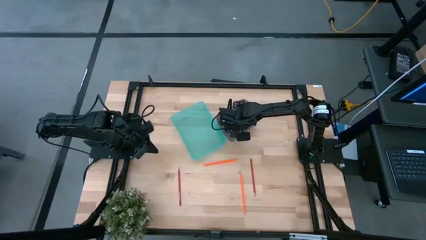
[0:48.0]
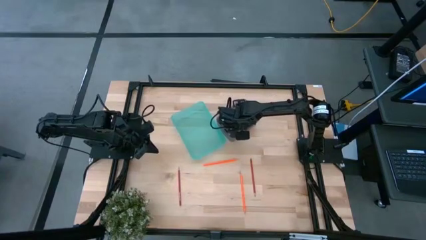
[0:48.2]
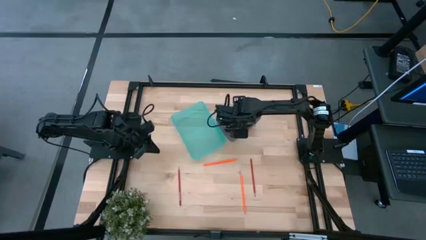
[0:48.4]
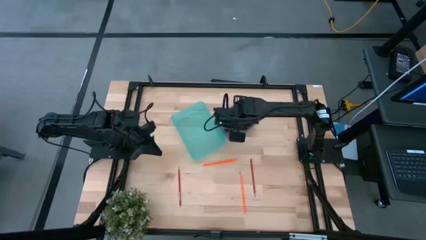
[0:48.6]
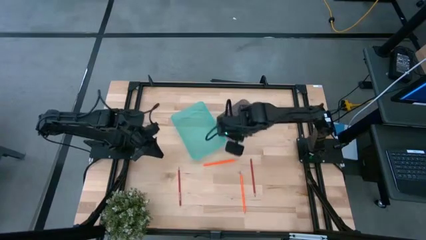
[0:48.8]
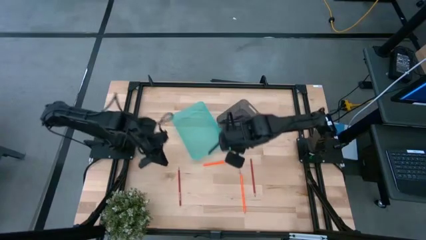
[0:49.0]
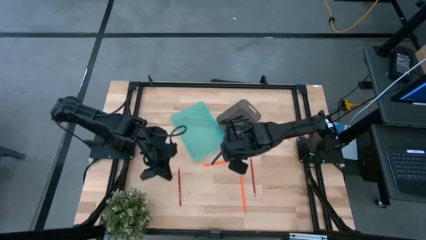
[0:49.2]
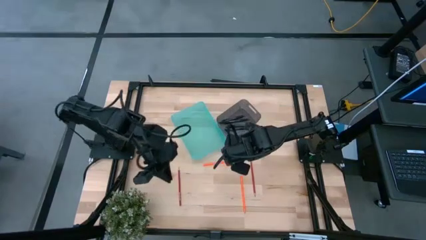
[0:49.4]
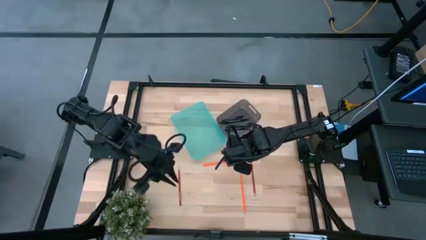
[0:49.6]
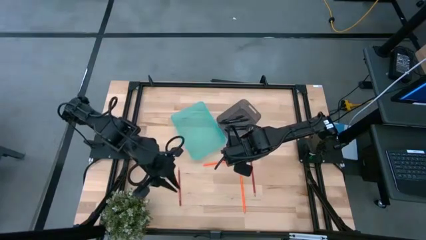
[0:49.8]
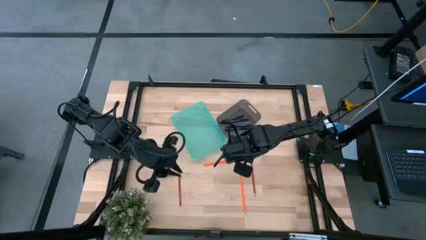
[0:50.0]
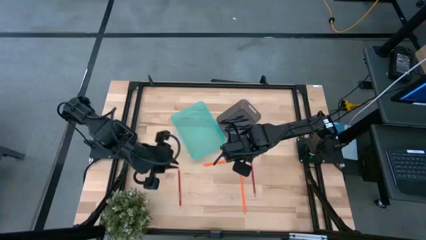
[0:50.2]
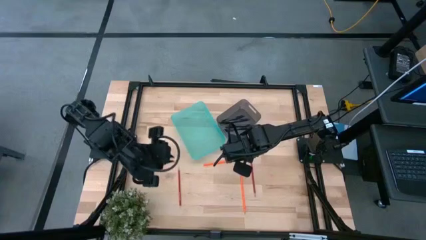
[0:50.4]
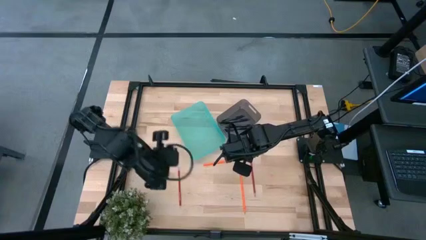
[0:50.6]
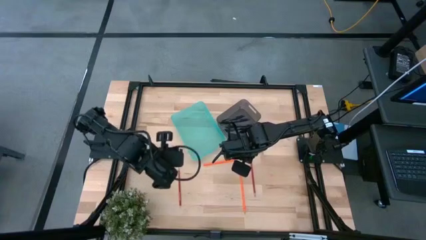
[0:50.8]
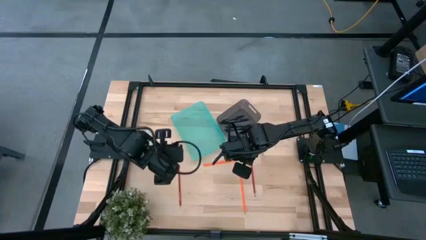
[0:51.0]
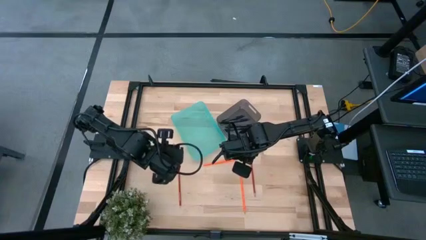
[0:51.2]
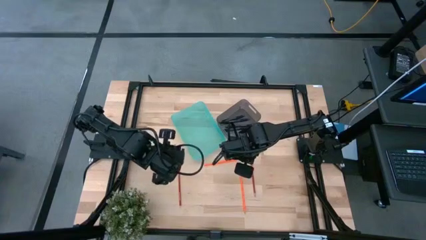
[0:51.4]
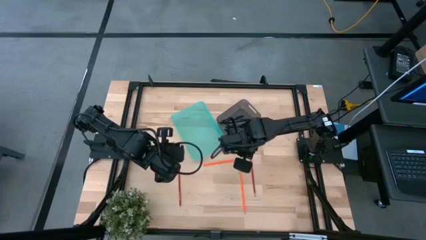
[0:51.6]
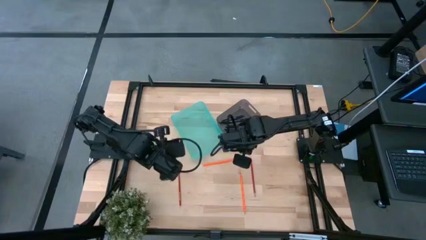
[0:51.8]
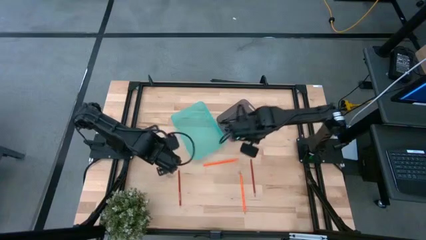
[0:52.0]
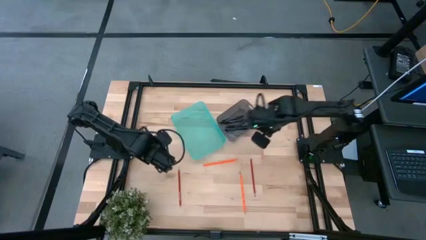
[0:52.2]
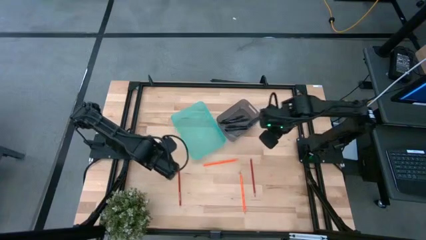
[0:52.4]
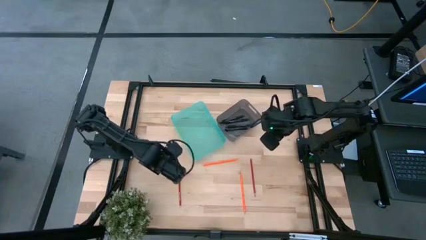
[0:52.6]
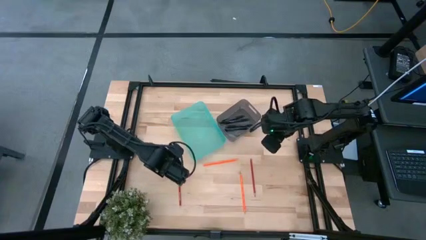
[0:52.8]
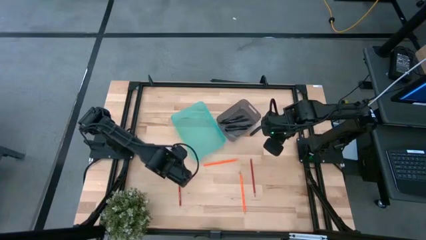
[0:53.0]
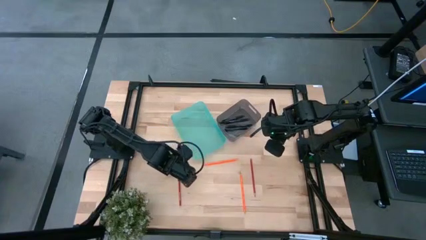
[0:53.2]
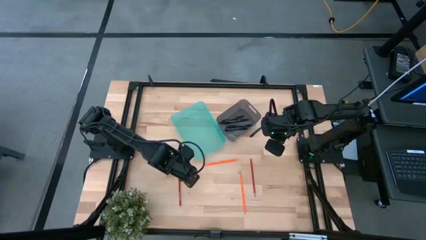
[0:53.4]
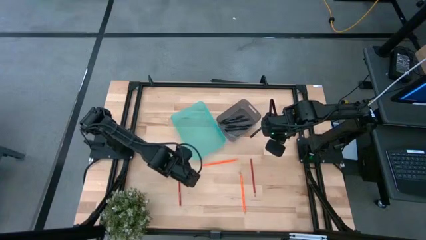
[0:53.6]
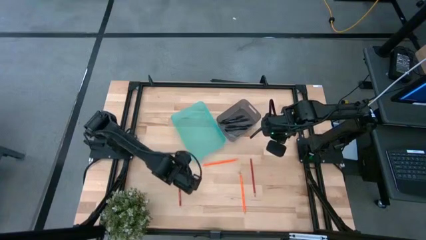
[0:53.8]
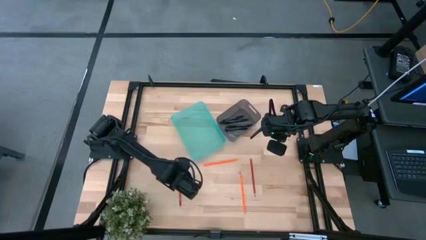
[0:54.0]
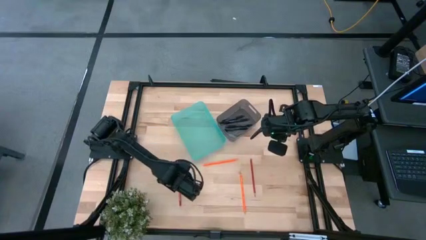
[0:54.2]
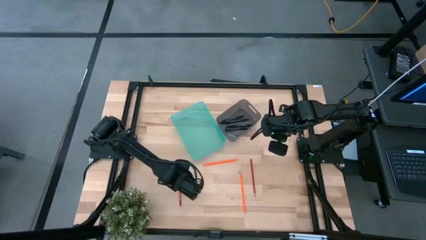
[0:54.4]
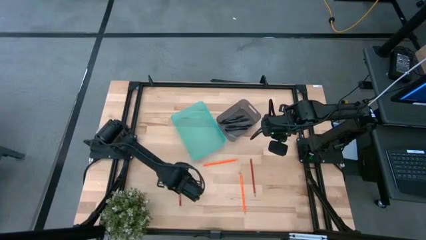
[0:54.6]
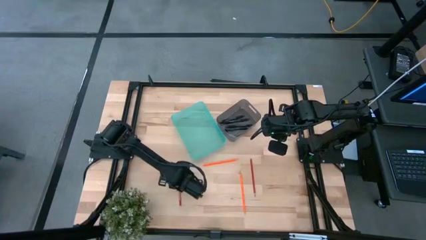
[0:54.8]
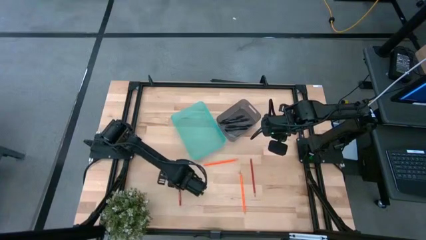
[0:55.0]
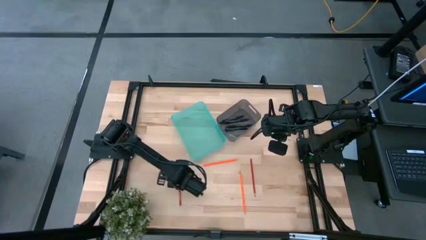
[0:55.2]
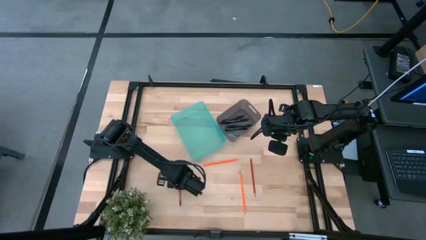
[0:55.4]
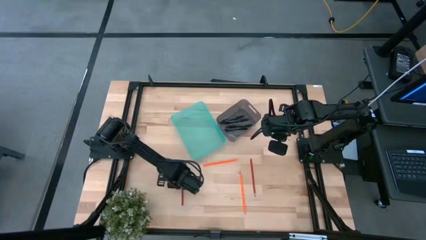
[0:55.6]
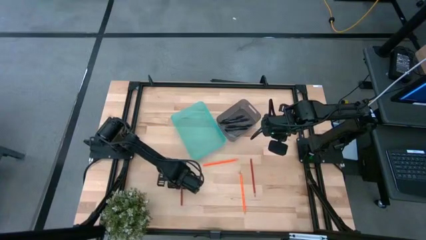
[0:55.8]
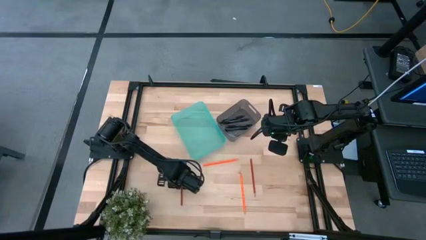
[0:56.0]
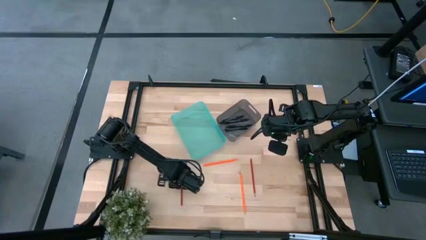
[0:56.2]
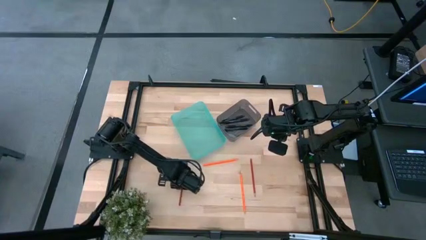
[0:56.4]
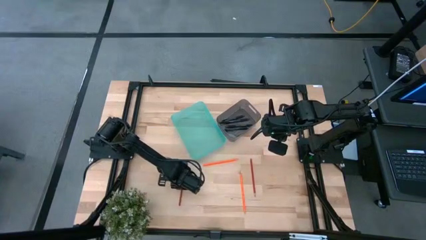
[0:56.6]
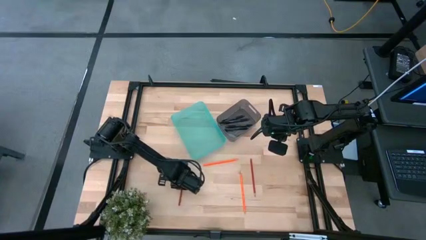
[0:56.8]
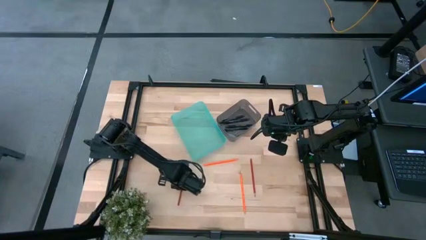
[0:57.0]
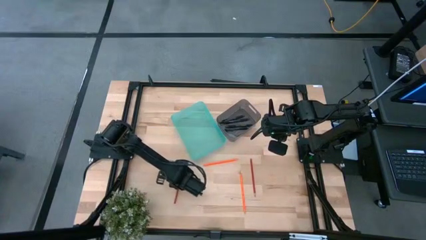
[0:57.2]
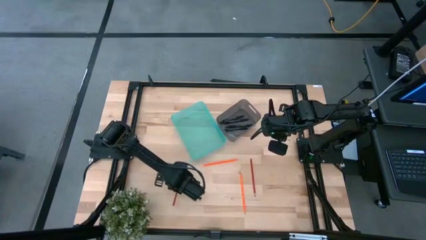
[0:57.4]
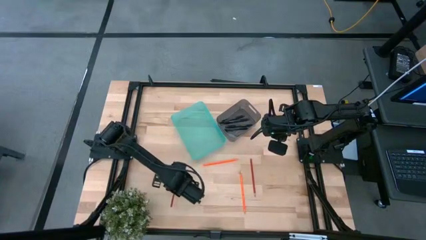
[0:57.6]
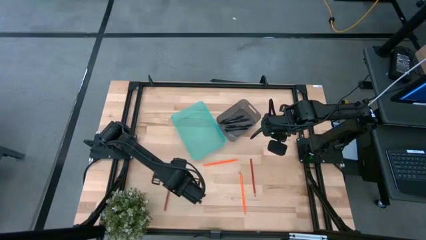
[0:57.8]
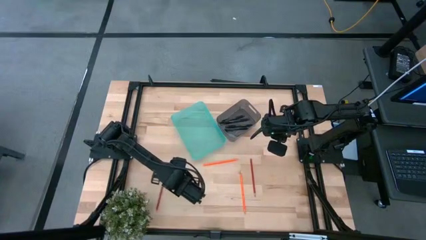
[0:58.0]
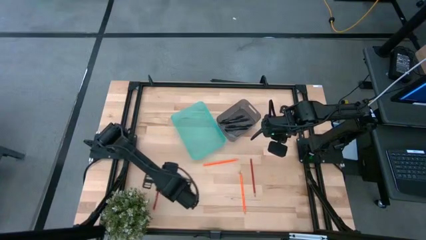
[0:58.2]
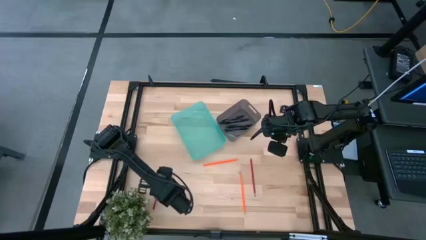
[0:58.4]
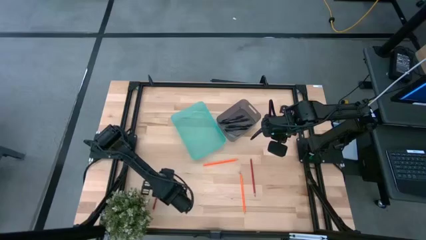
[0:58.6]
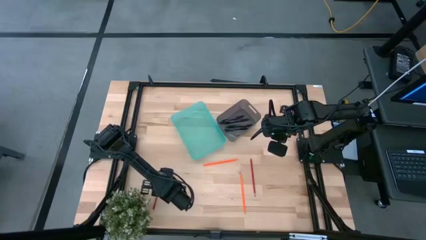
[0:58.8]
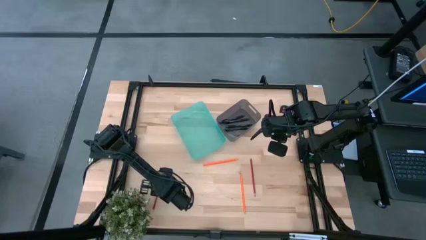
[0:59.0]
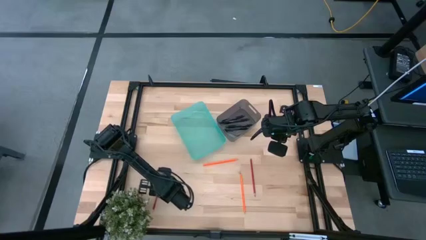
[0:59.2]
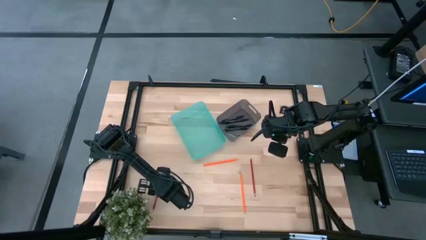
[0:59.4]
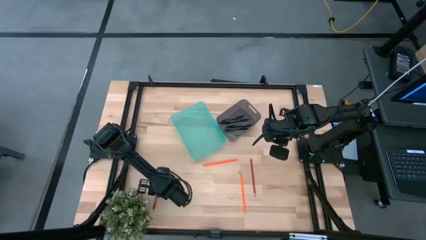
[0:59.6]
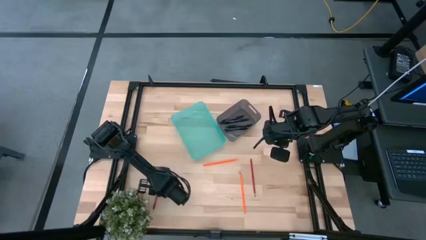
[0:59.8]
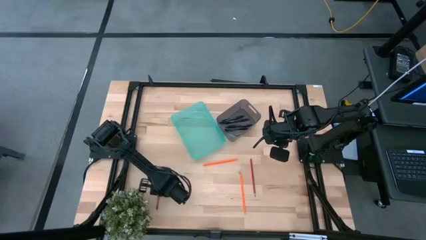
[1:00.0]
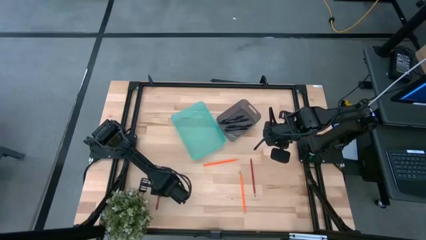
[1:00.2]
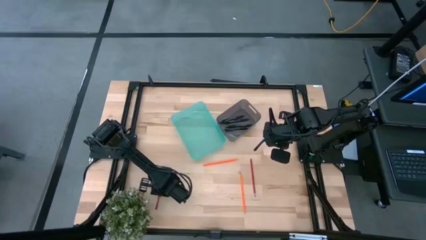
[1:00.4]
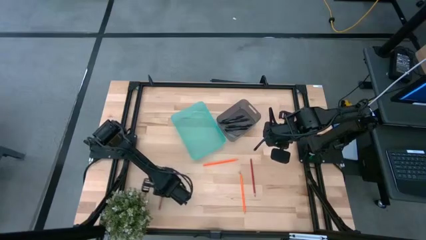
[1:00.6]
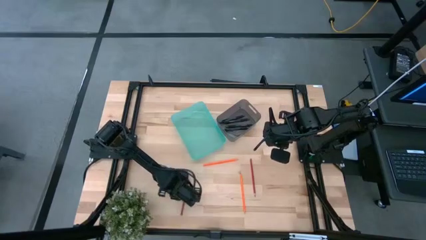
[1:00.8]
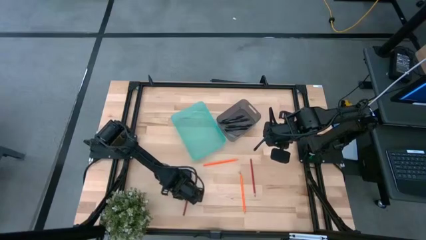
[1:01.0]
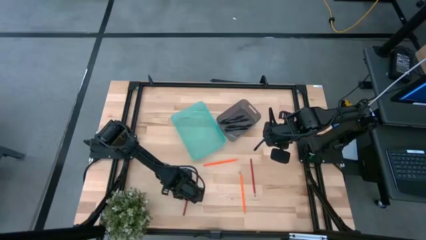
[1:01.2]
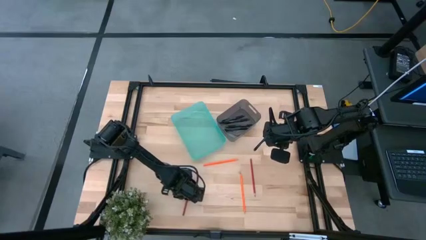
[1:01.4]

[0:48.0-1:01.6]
Task: Sort pens & pencils
Put the left red pencil into the light blue bin

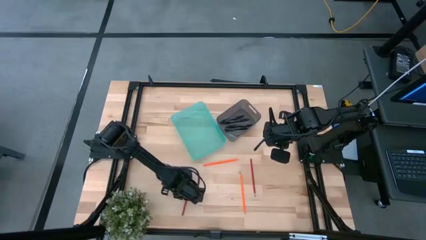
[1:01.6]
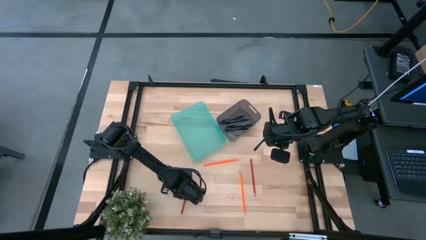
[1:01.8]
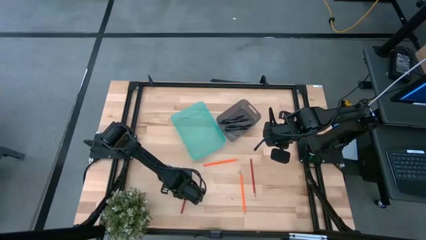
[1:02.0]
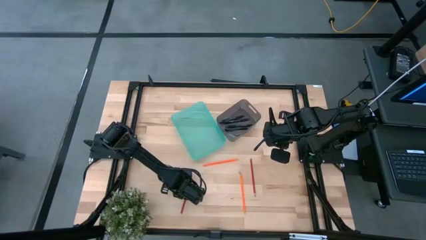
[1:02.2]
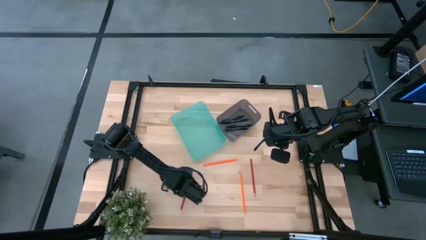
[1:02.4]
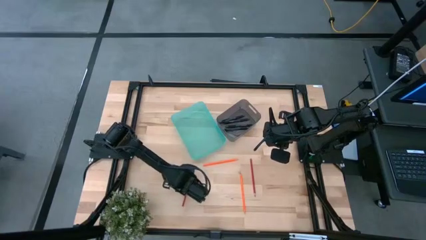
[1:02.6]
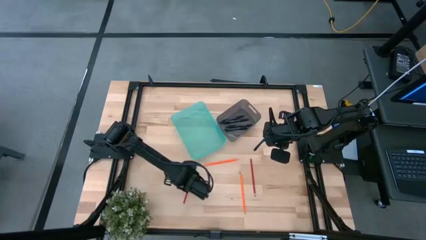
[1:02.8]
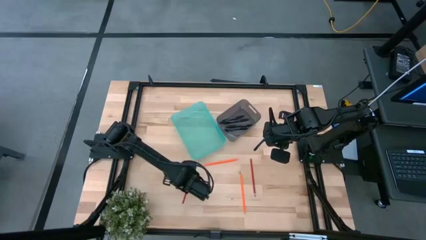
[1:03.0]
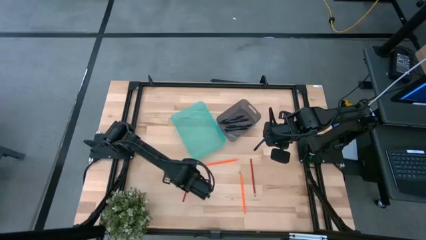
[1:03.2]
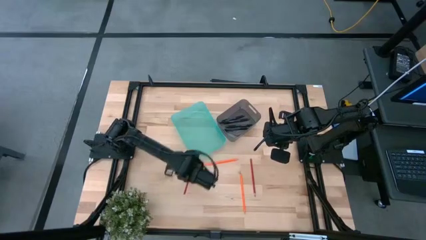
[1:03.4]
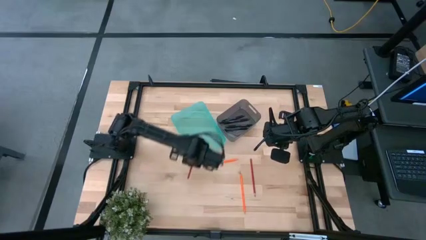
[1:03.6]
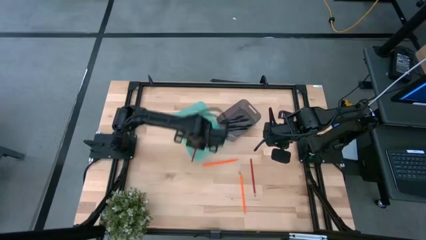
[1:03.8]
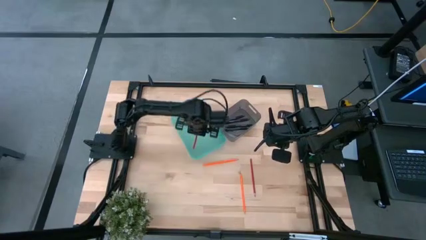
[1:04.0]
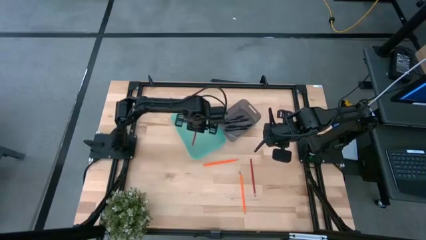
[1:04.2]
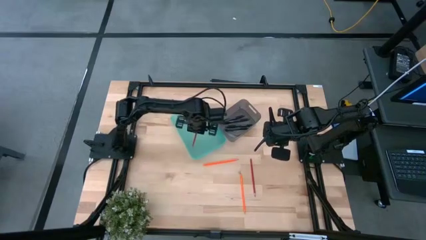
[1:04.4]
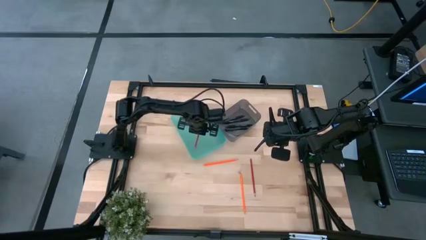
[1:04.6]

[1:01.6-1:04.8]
Put the left red pencil into the light blue bin
